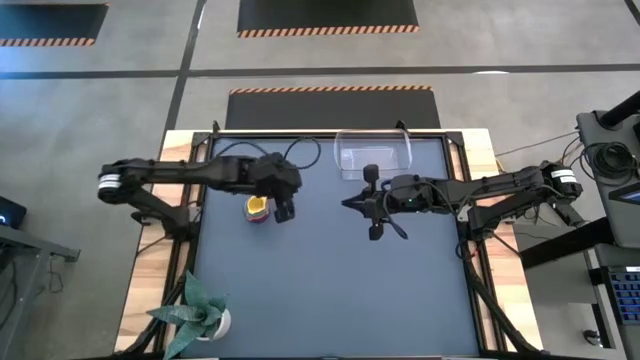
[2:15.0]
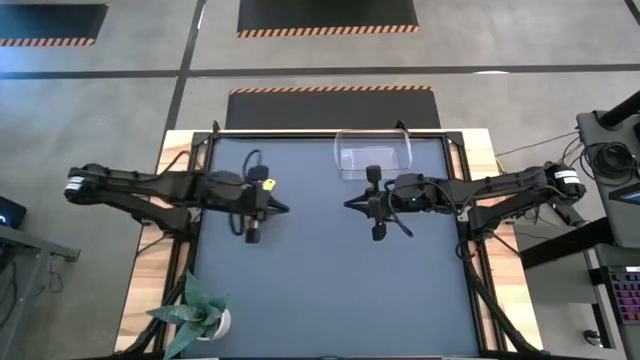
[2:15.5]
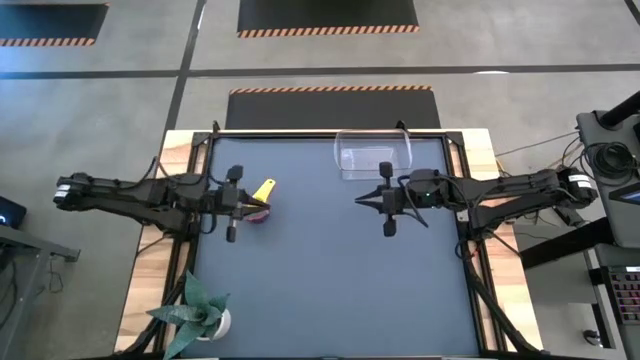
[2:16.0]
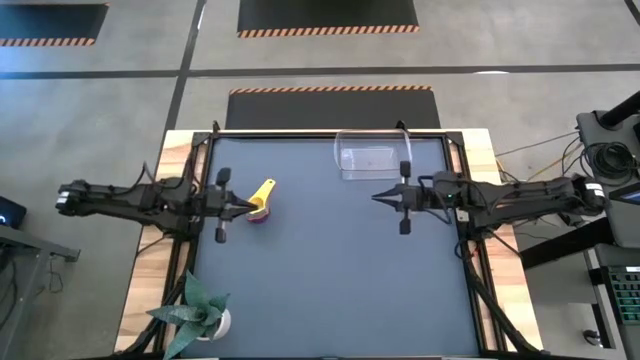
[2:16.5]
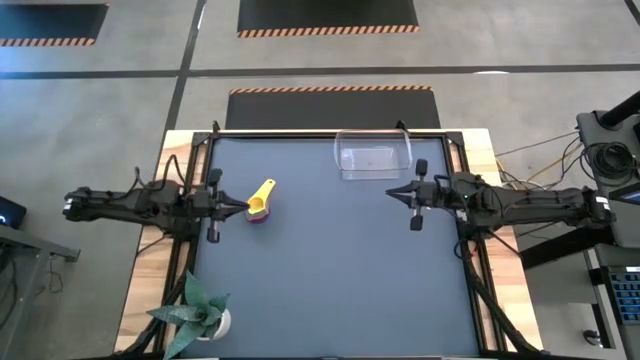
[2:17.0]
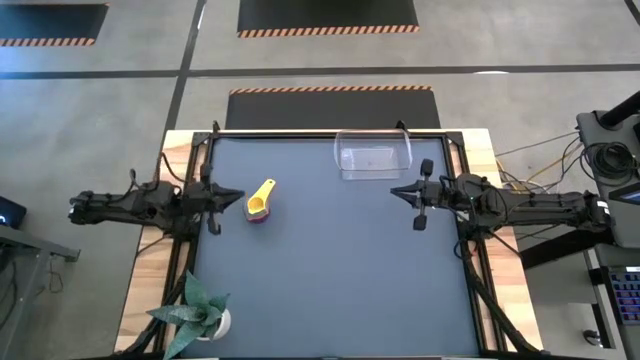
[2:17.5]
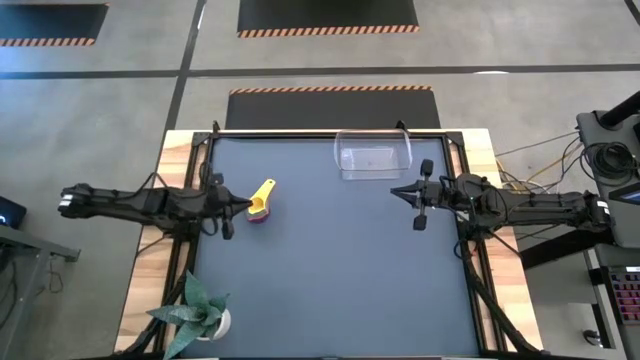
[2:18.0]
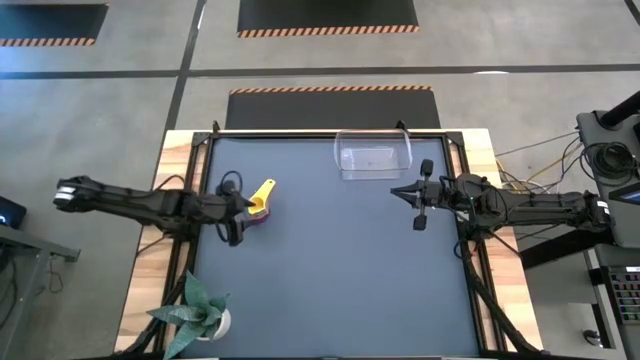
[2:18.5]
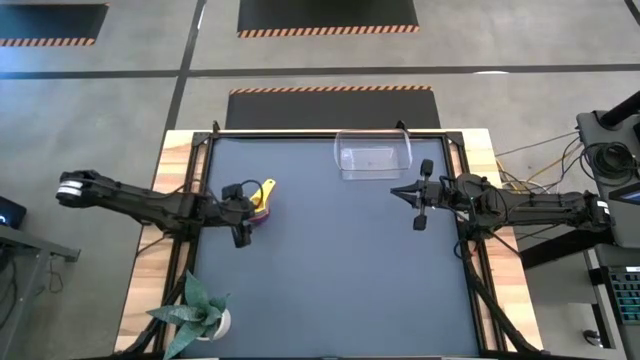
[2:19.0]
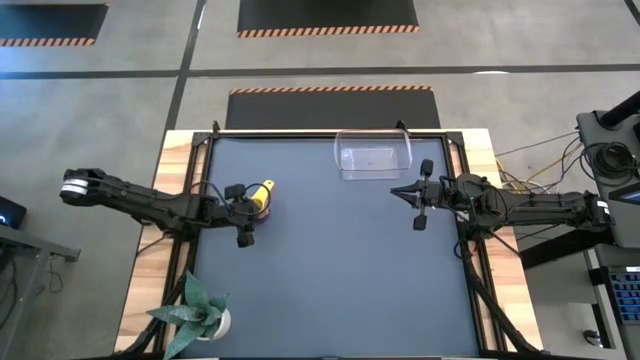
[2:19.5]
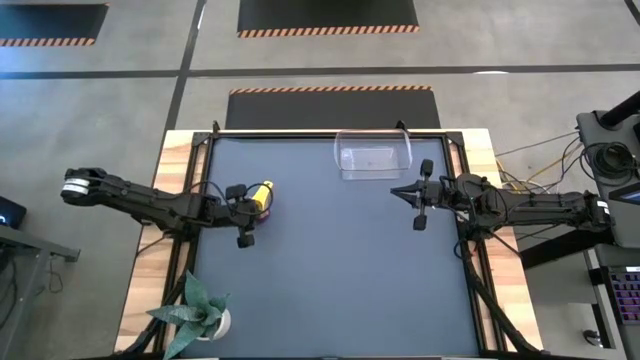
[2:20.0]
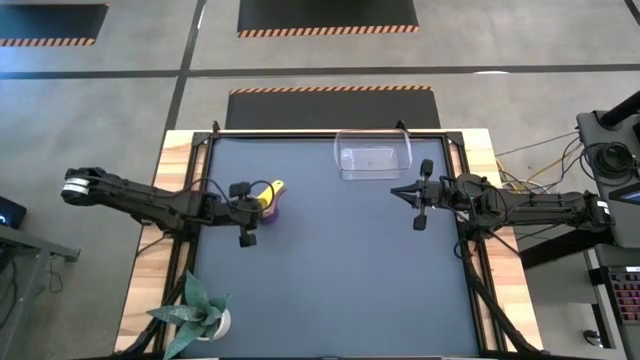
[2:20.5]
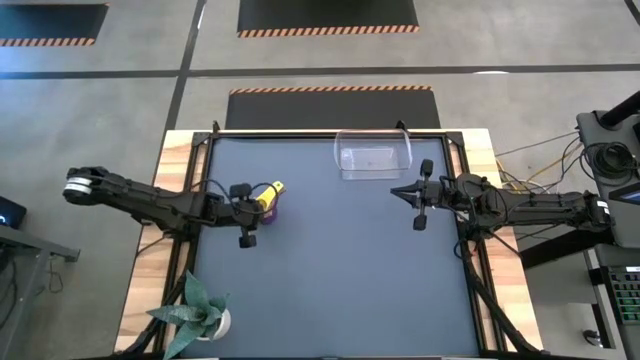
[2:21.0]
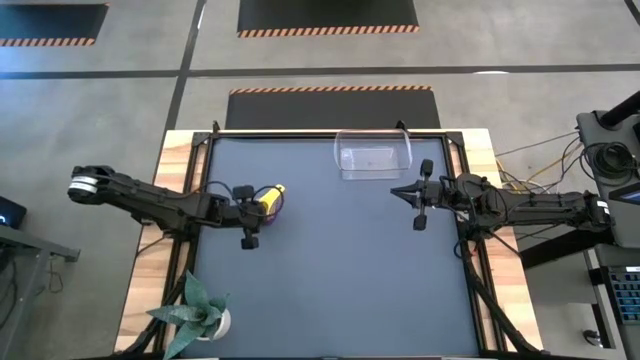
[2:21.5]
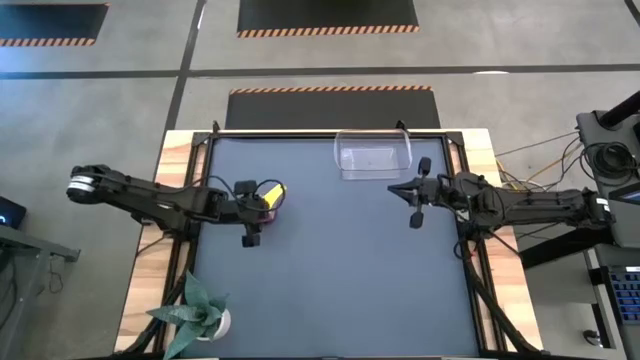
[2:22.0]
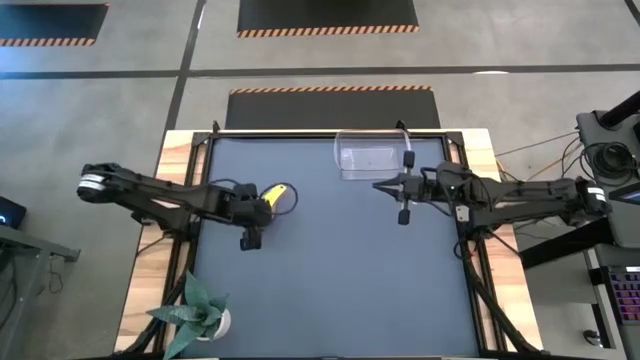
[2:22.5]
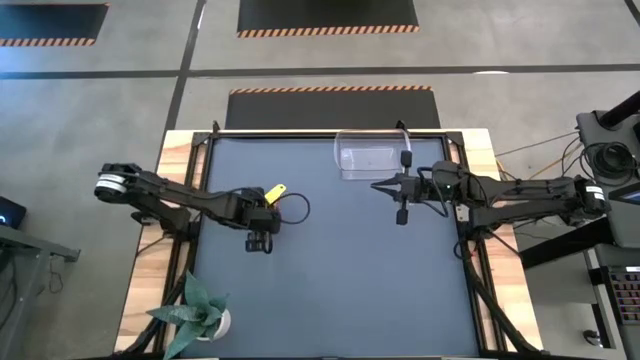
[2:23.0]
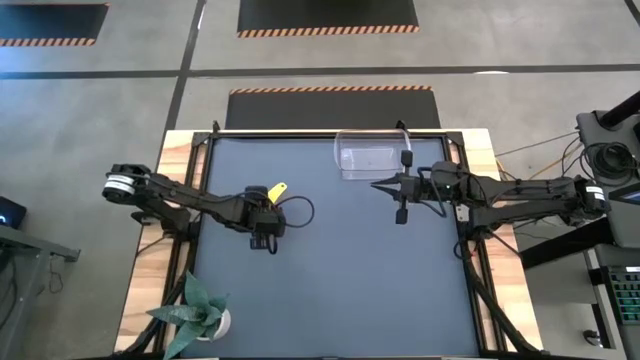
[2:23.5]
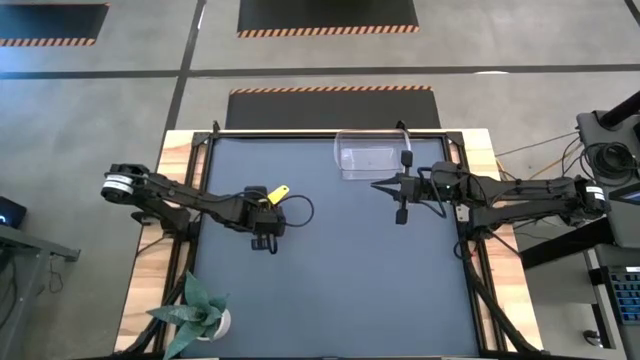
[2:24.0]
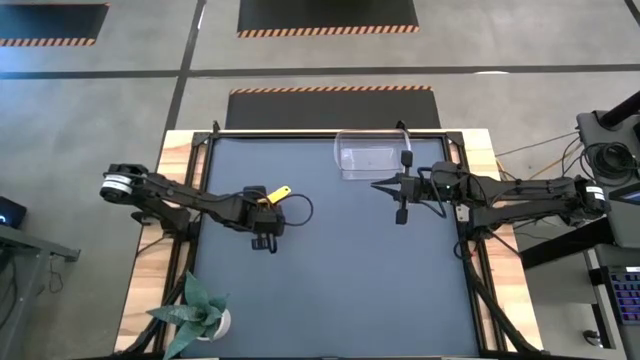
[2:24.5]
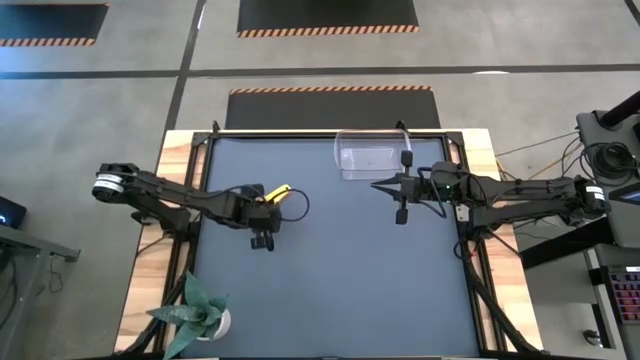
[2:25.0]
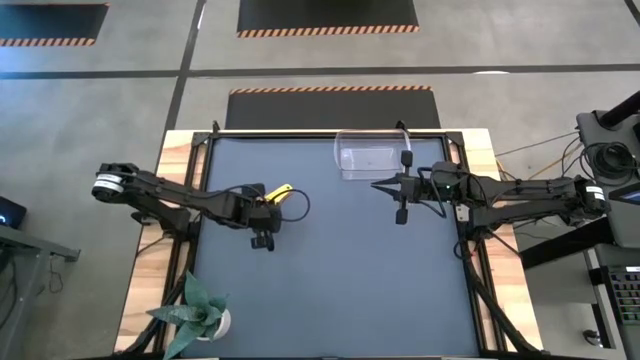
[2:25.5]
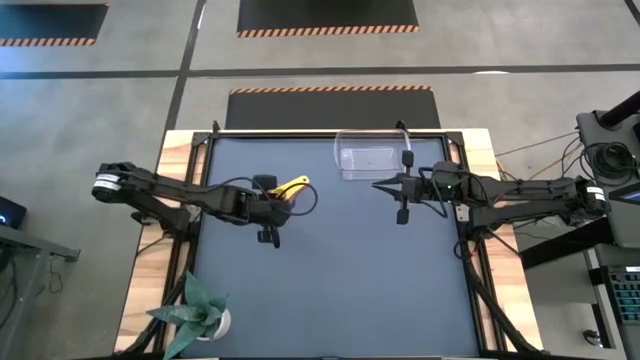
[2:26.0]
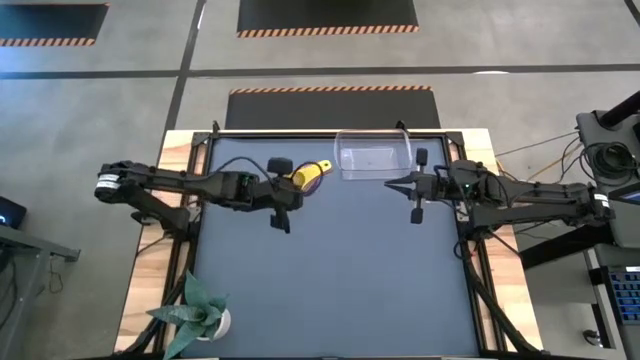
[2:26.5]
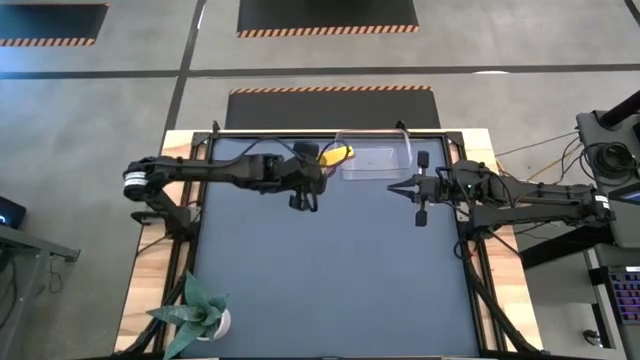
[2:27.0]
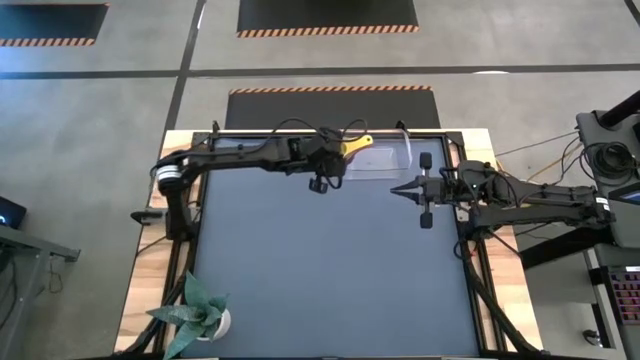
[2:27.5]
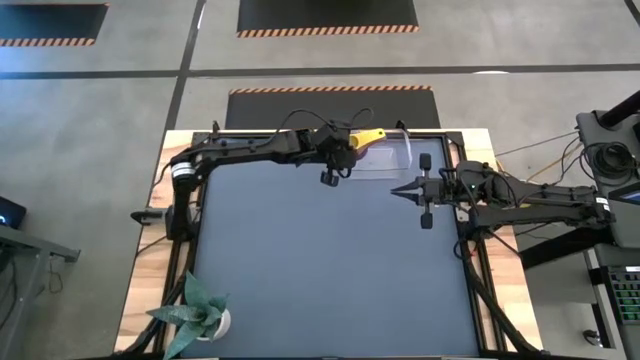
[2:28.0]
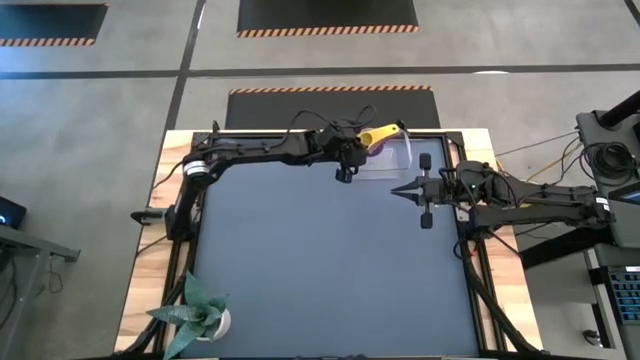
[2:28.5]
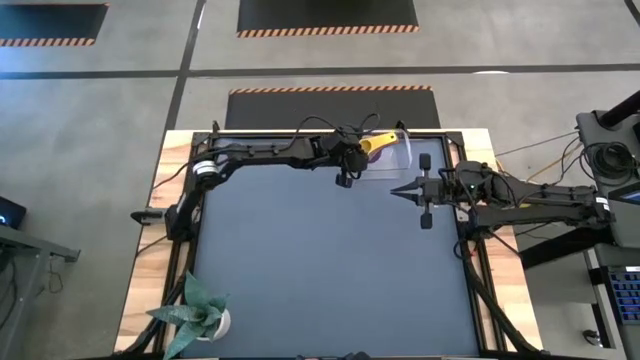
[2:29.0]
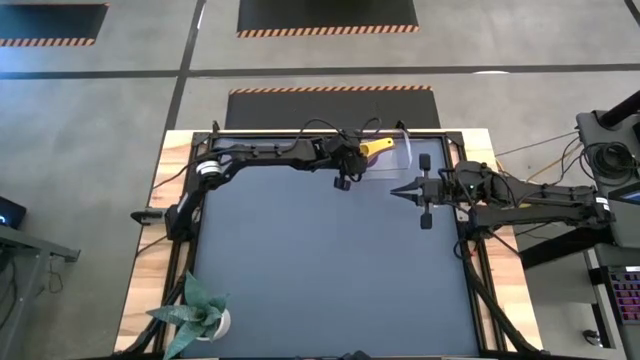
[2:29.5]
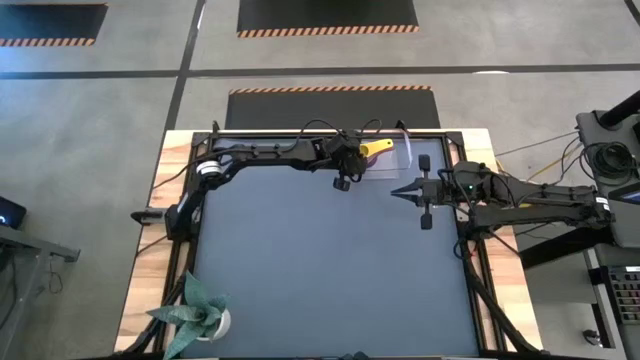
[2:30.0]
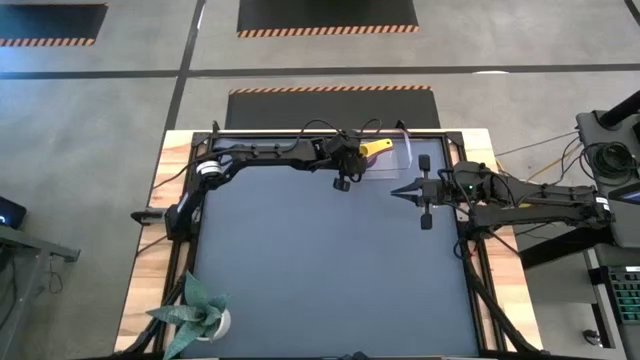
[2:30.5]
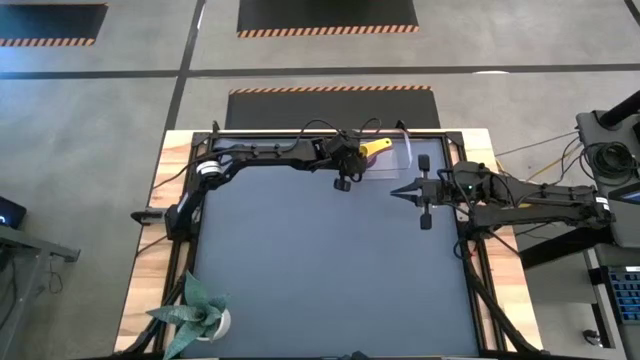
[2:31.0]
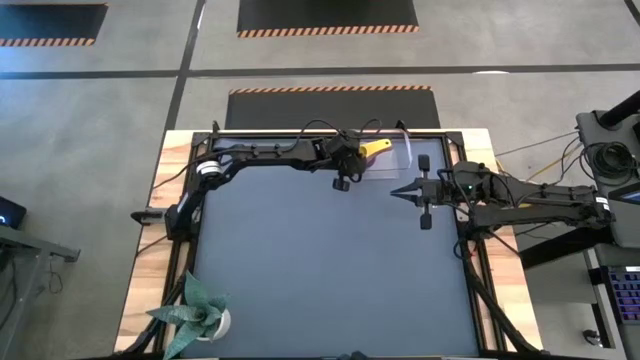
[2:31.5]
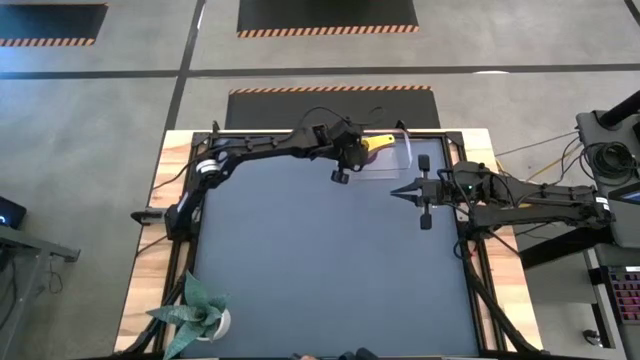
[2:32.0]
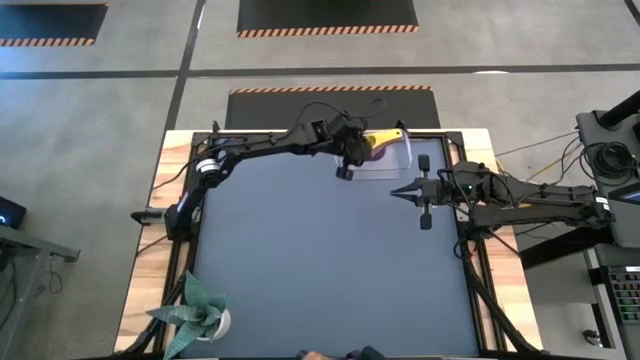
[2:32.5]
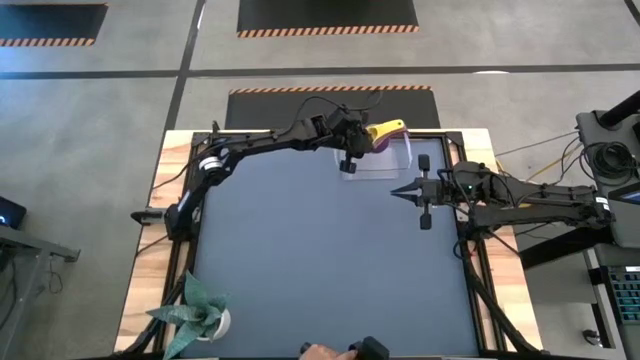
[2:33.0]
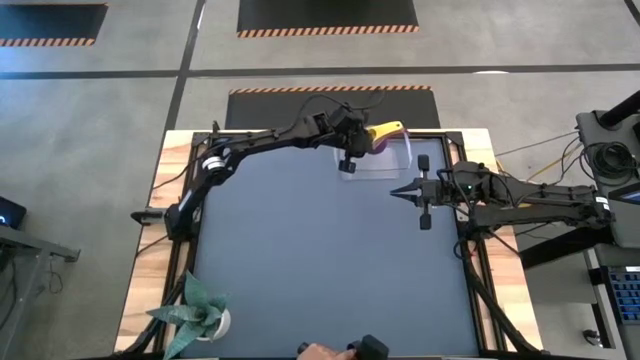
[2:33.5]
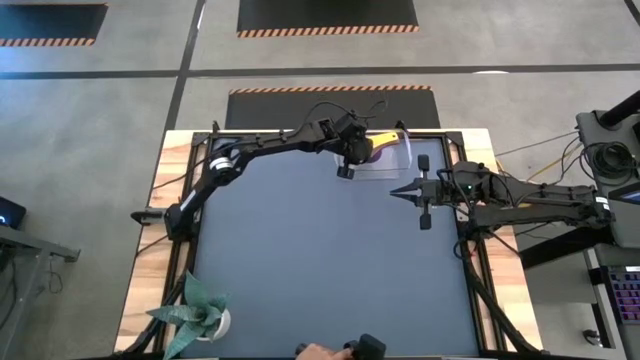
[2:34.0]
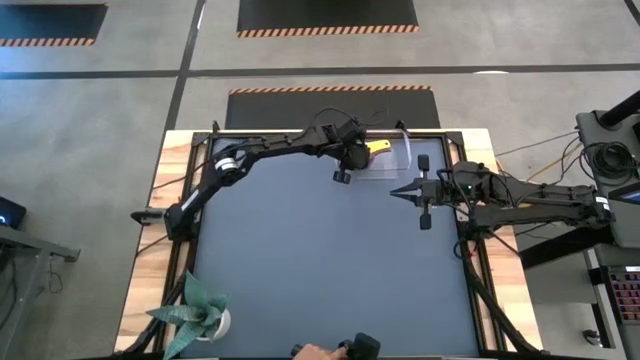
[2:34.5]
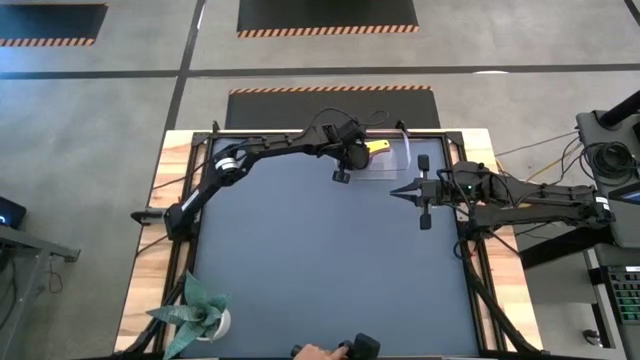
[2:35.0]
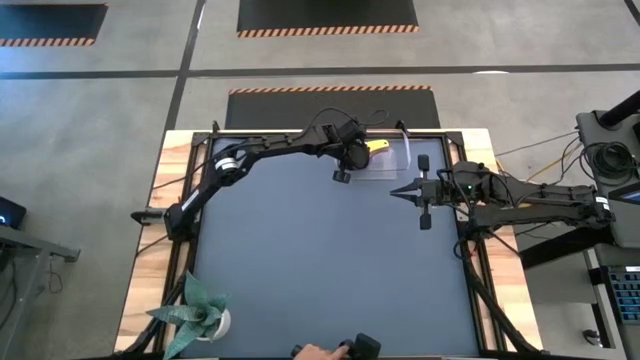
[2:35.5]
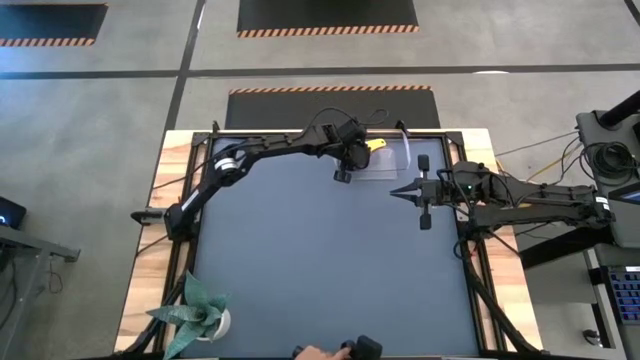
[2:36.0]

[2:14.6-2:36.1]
Task: Nest measuring cups in basket
Put the stacked colored measuring cups into the transparent bin

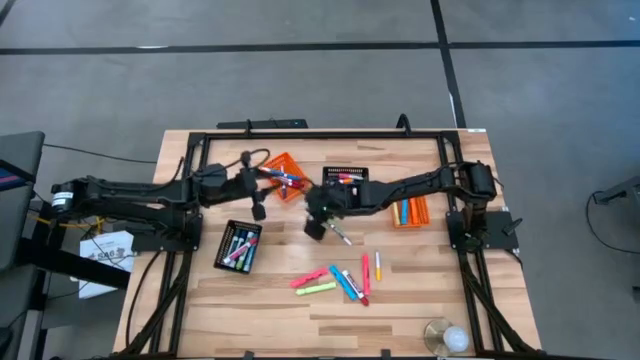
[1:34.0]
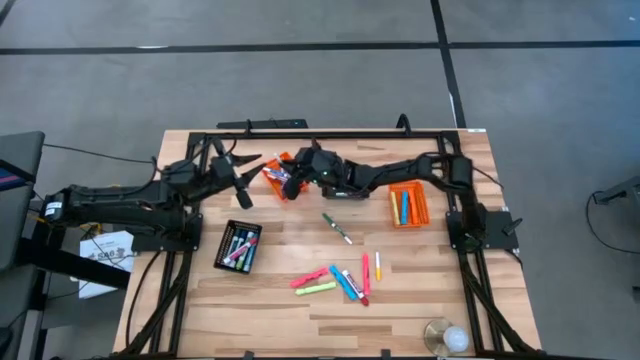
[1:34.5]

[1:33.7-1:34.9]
Task: Pick & Place Markers
Put the light green marker into the left orange bin
